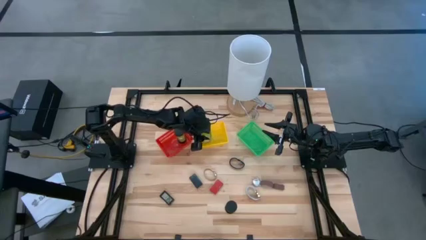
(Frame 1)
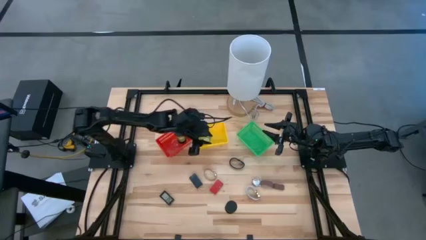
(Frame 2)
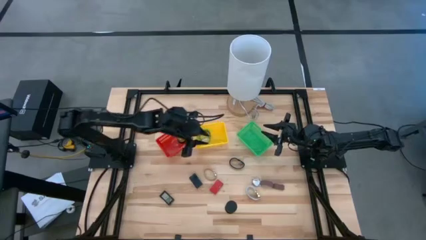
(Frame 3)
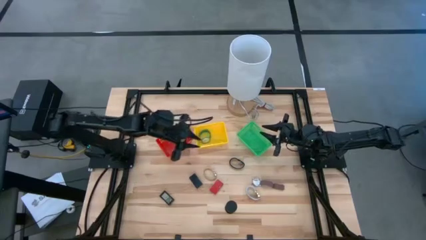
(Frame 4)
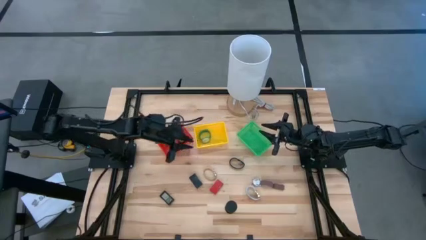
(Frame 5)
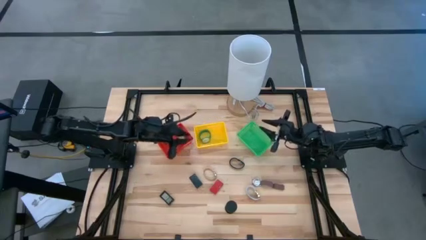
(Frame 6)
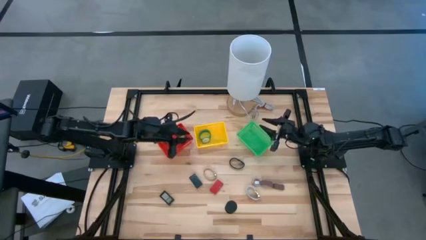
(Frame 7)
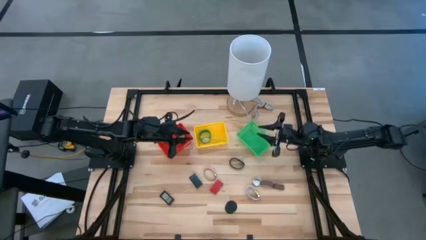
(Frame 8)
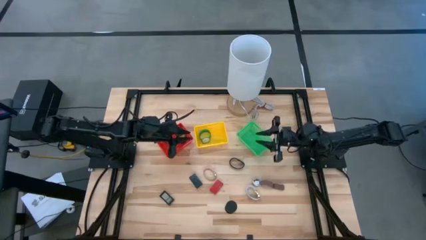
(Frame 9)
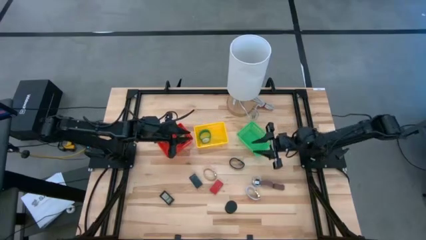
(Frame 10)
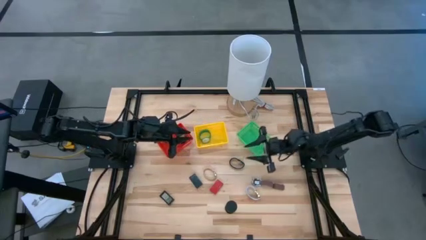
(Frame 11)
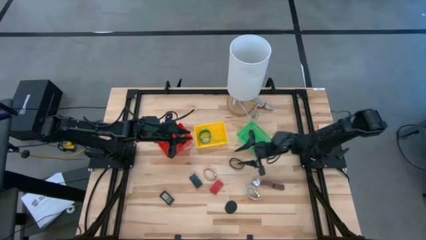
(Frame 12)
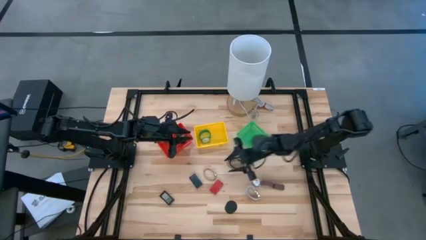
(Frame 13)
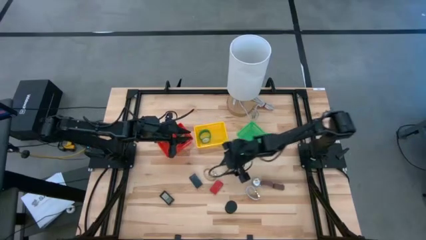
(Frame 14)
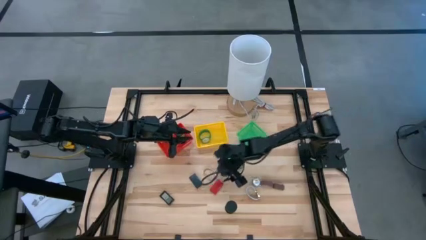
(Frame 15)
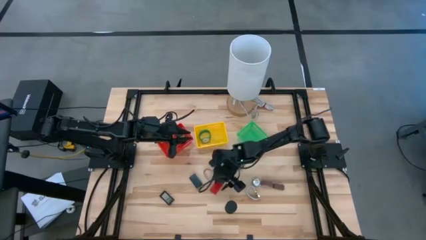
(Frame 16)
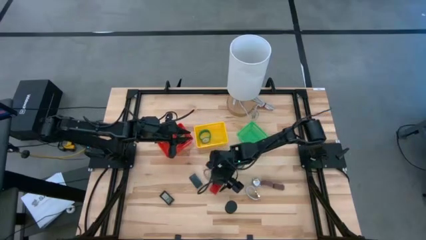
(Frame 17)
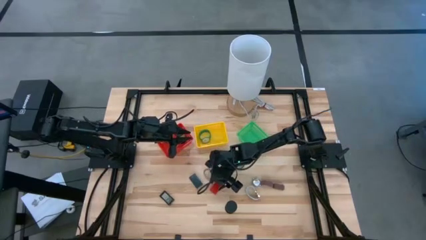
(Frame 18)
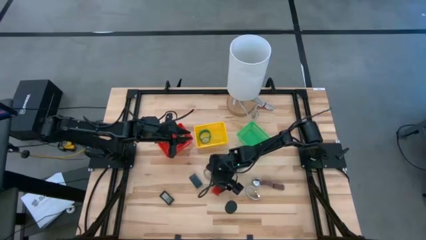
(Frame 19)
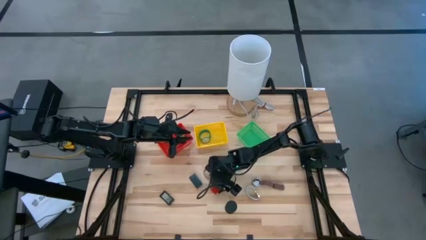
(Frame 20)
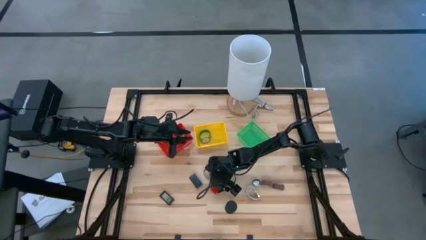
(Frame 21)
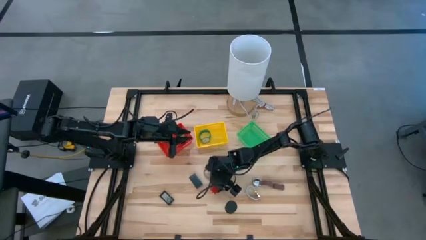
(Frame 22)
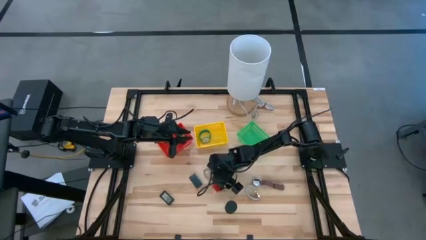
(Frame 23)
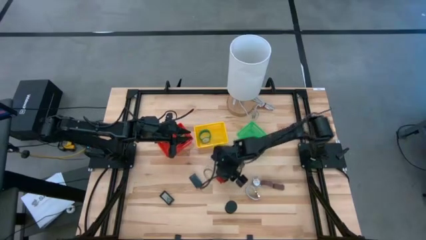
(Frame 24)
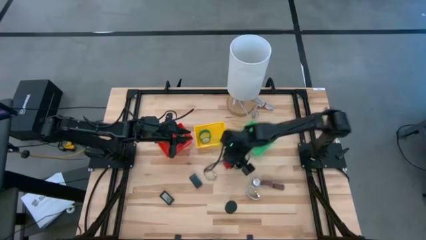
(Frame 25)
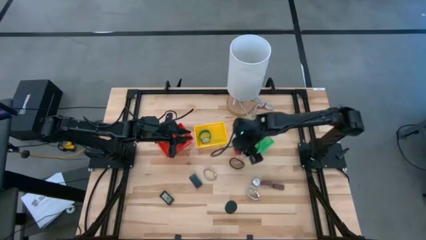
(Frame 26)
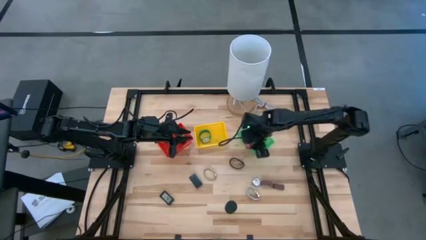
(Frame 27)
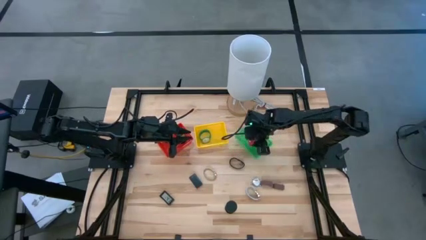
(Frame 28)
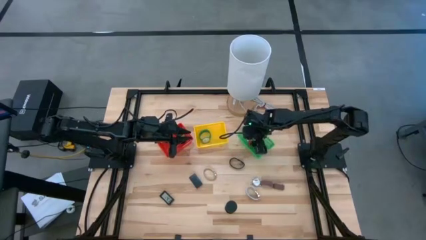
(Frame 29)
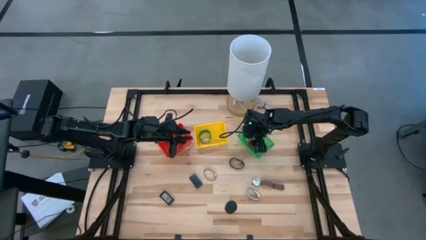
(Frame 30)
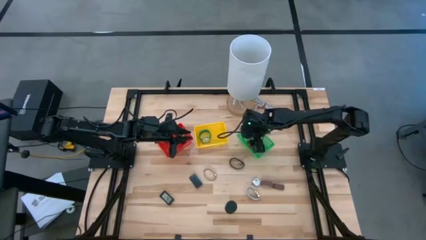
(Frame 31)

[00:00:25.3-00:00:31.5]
Task: Pick & Place Office items
Put the orange digital timer into the green basket

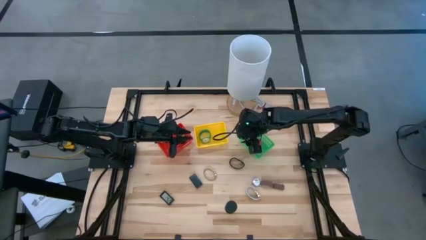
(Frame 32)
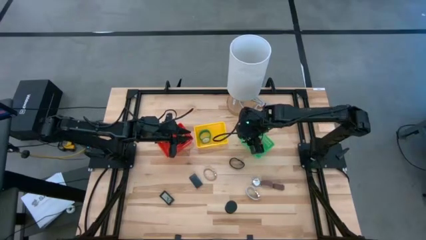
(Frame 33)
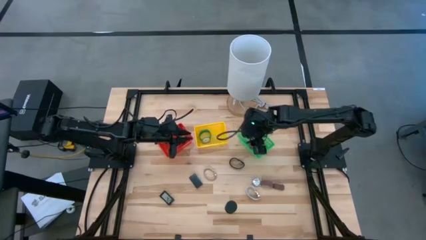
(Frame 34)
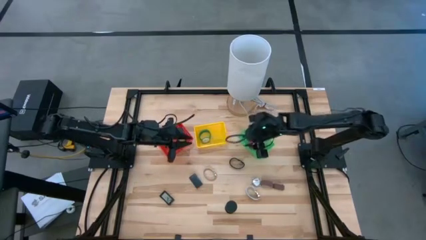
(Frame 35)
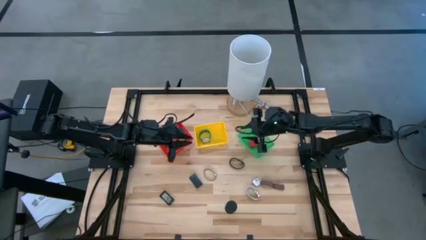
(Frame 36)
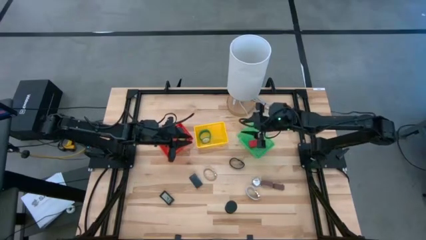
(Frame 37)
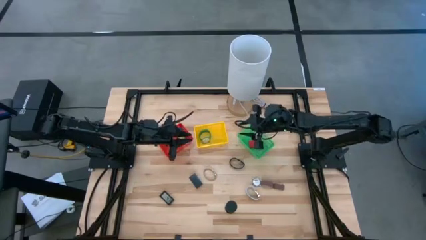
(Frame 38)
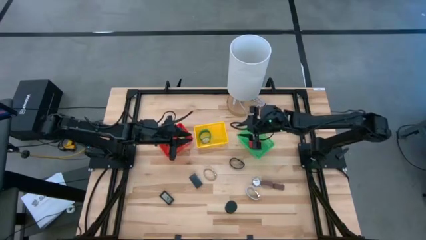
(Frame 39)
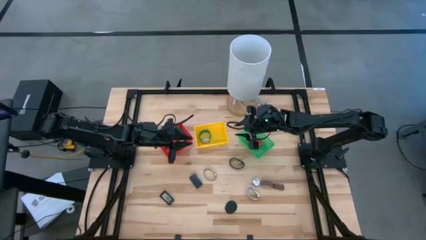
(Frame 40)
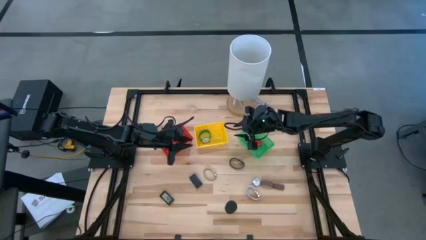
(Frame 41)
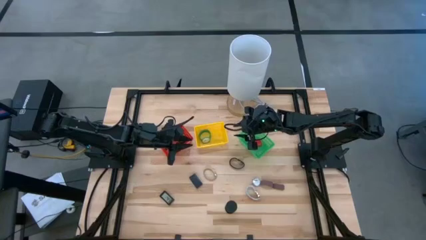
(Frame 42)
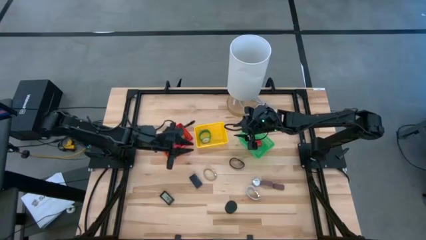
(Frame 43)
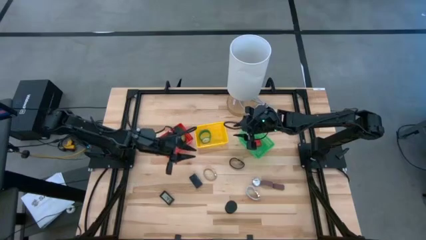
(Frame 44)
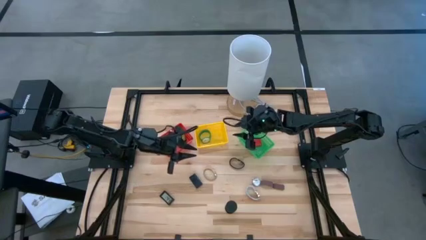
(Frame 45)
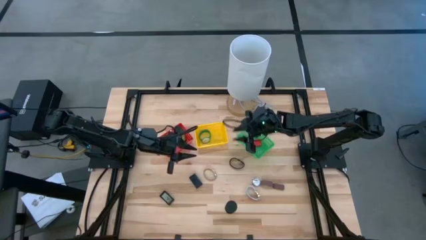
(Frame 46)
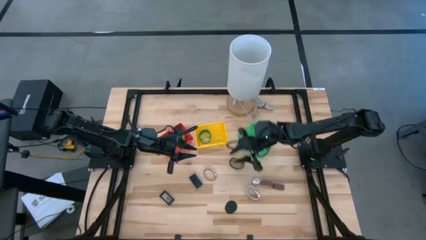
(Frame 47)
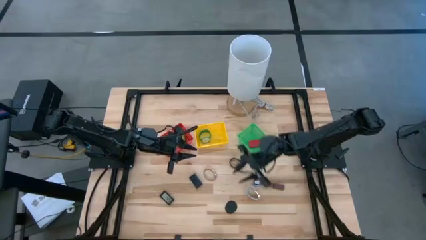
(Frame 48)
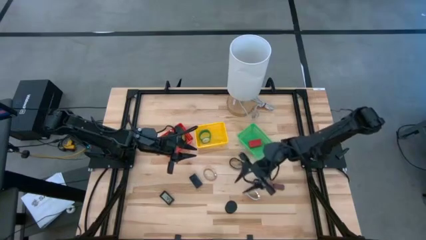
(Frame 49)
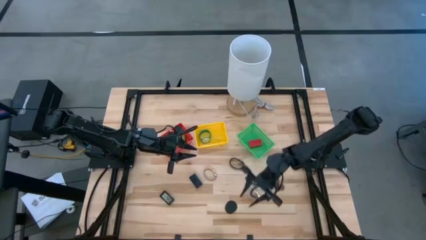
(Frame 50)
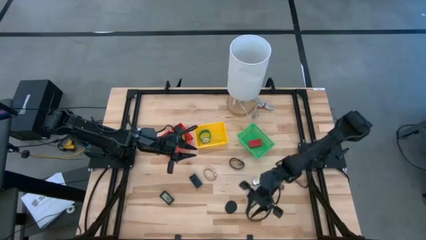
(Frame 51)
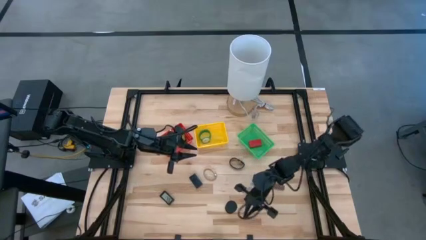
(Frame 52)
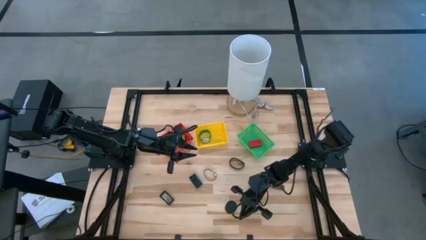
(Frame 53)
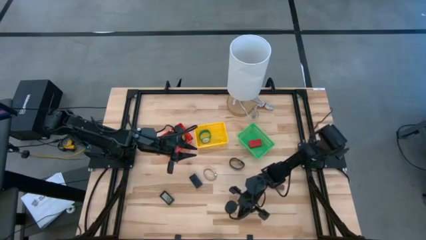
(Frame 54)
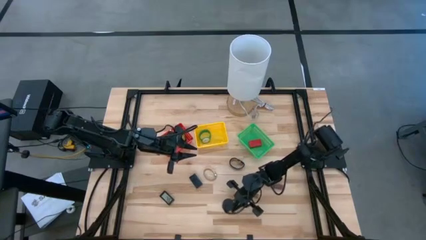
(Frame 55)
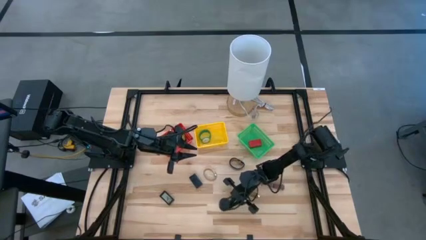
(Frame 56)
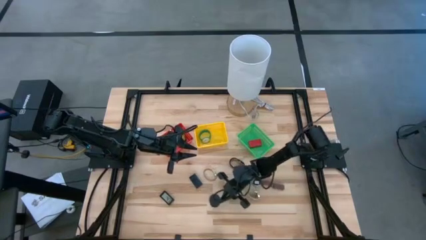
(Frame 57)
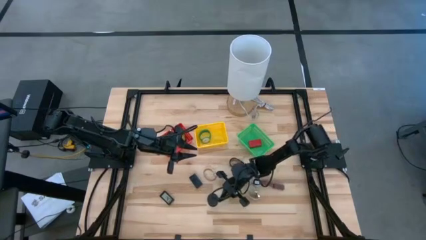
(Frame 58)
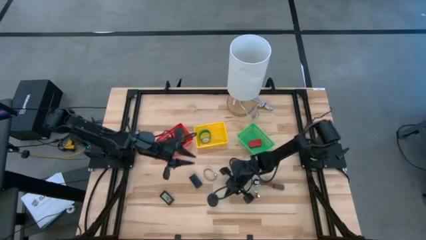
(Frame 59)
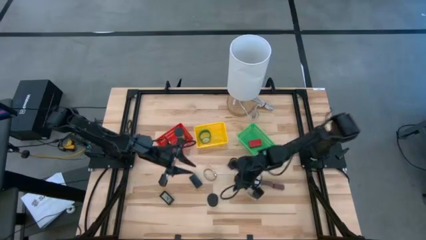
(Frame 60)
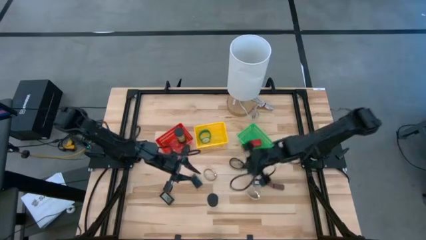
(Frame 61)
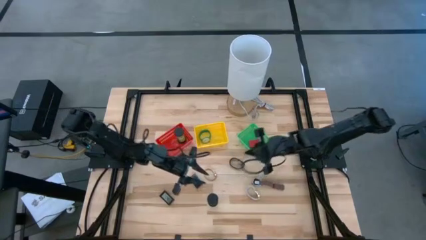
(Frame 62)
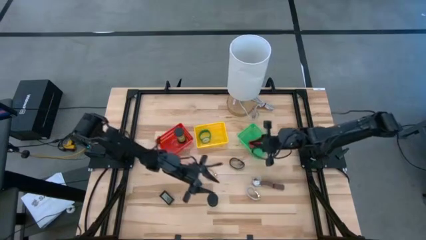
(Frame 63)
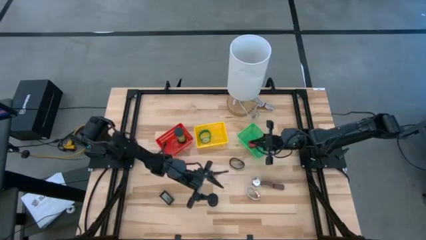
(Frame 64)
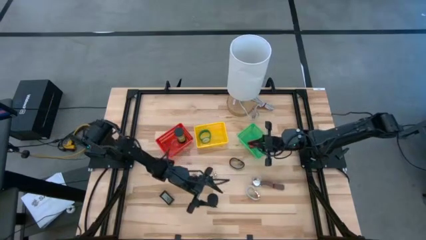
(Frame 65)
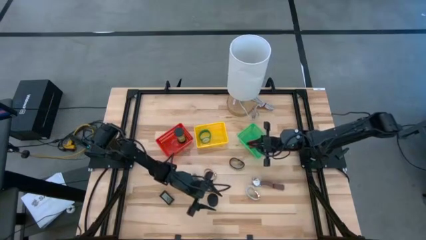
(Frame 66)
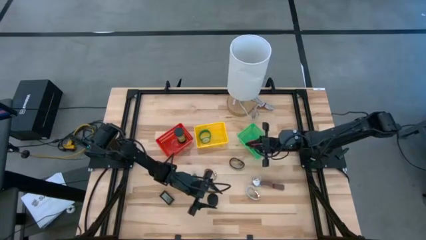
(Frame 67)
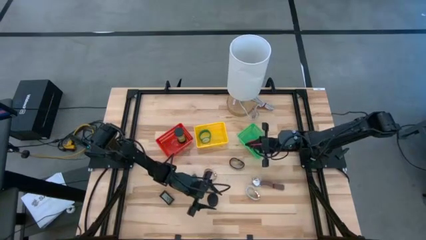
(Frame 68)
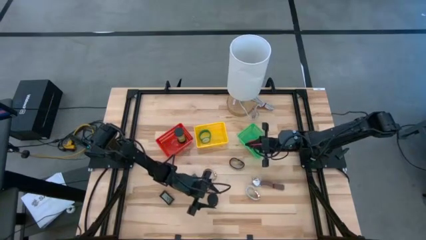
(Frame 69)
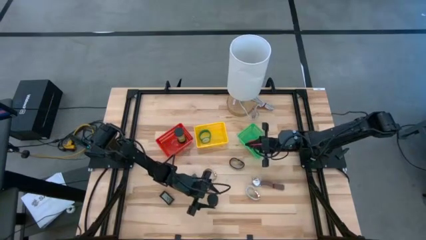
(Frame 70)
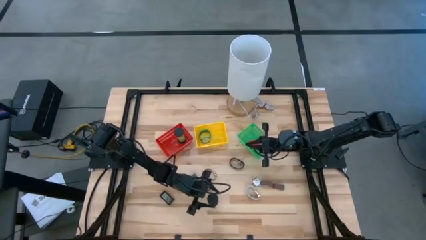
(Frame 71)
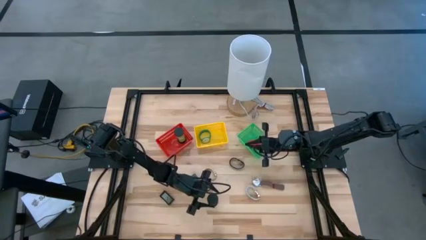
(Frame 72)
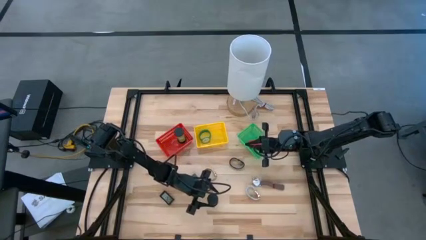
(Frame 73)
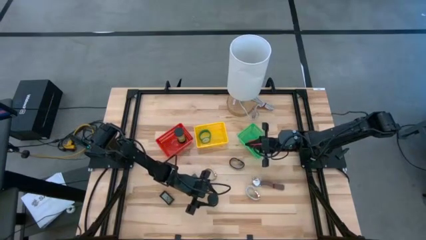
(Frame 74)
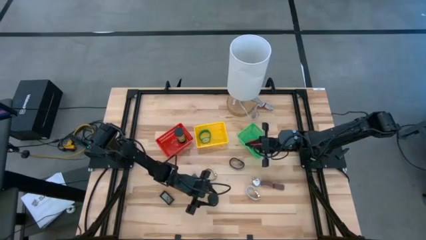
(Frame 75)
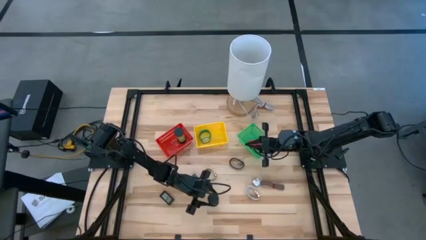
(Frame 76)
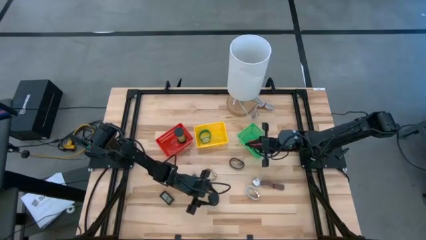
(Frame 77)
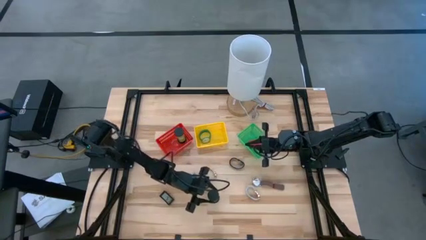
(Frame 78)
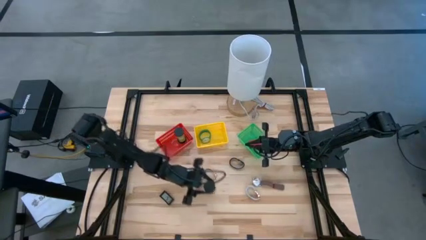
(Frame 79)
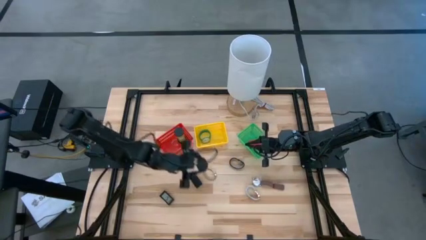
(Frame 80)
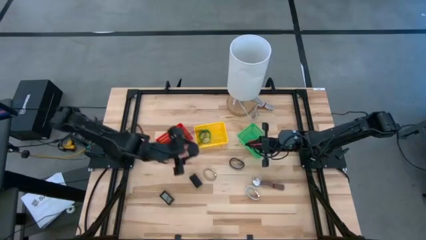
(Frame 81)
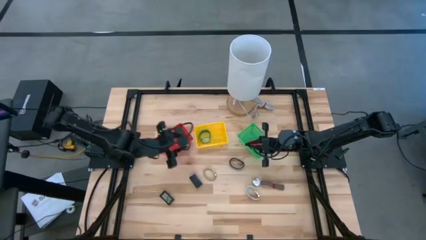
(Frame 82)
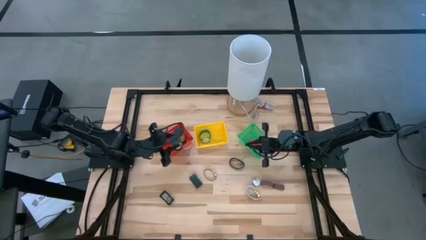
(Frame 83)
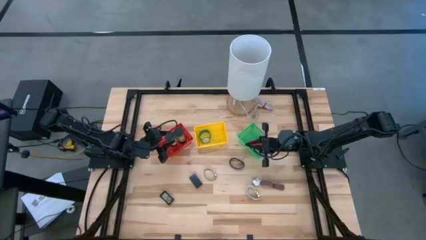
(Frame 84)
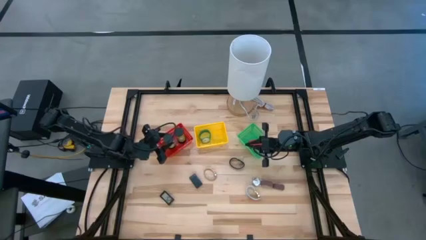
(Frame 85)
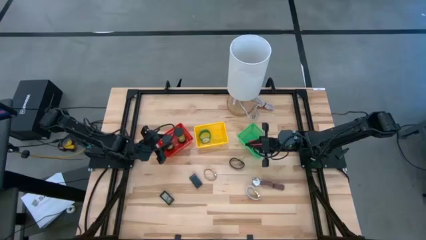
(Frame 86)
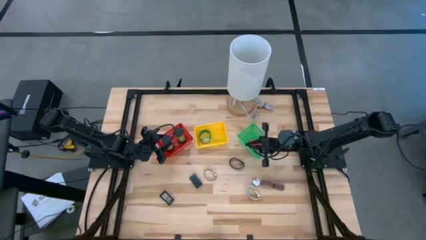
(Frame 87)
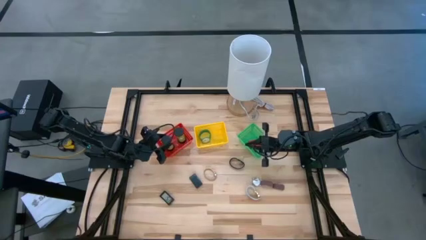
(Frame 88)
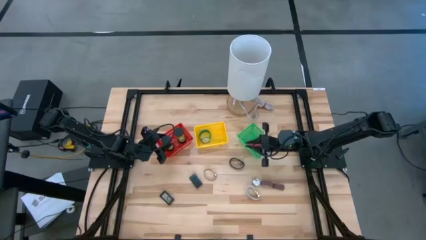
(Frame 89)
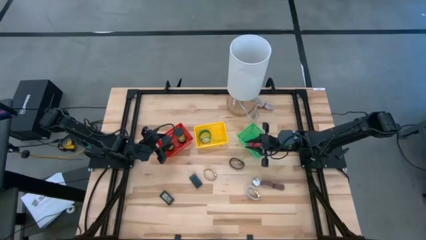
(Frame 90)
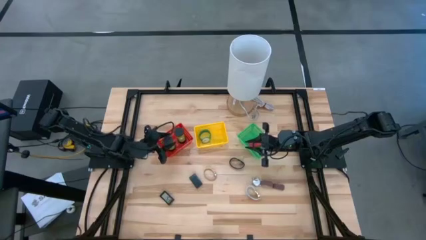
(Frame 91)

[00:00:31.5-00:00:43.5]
Put the black hourglass into the red basket
